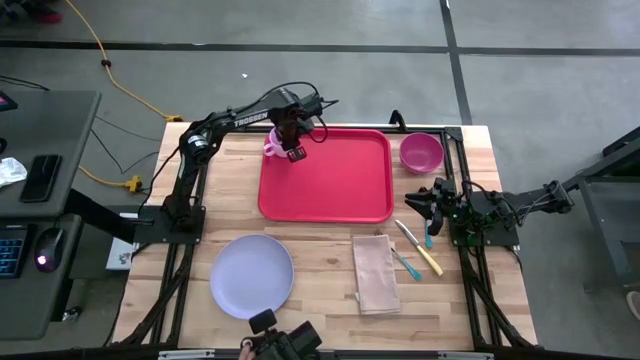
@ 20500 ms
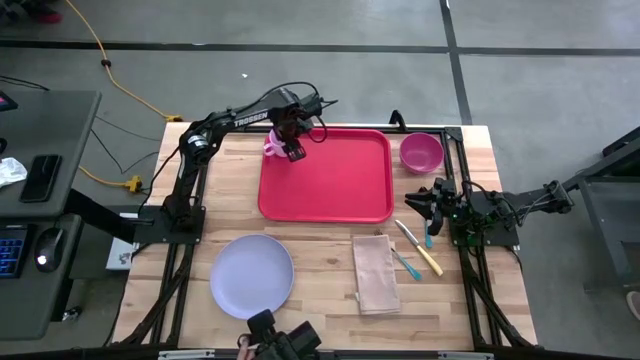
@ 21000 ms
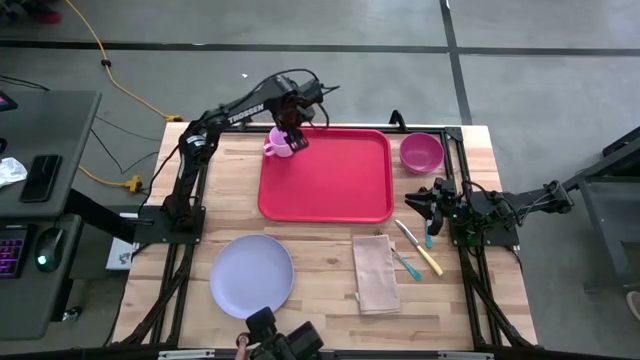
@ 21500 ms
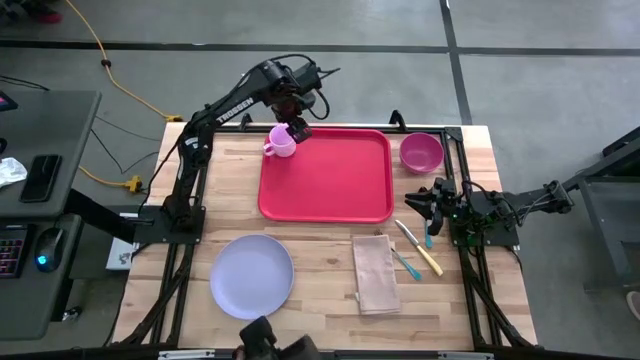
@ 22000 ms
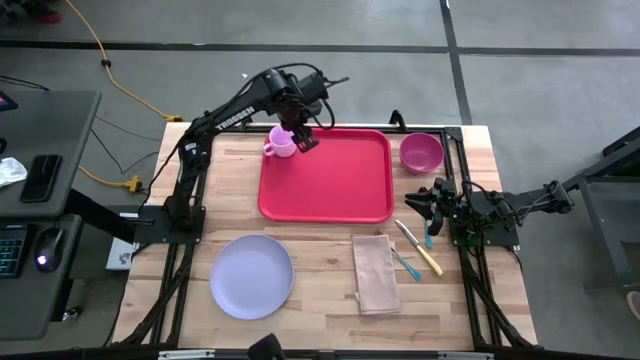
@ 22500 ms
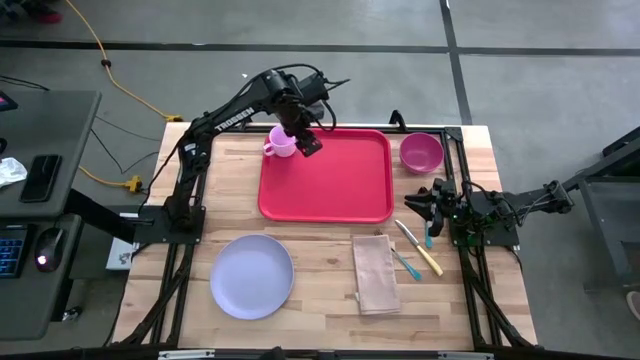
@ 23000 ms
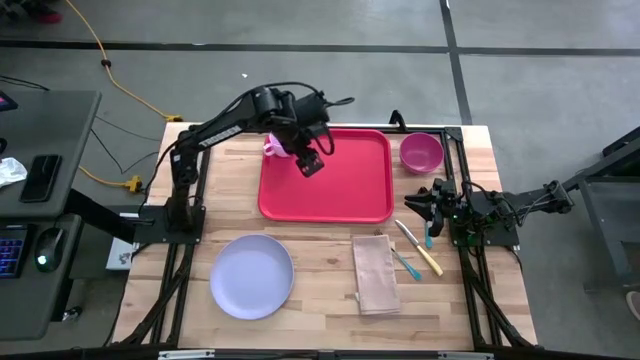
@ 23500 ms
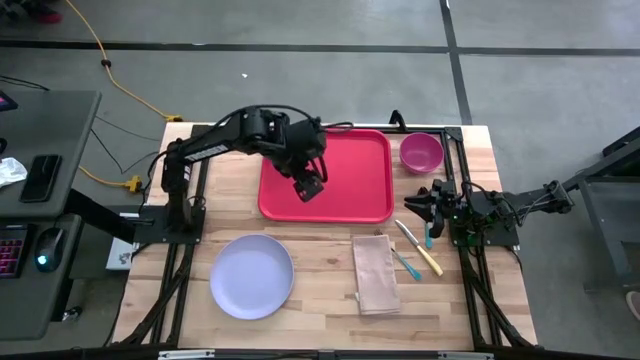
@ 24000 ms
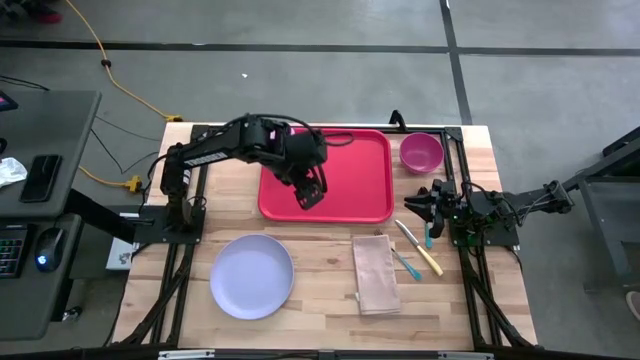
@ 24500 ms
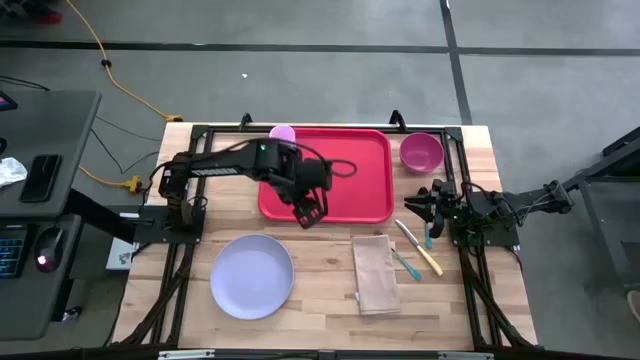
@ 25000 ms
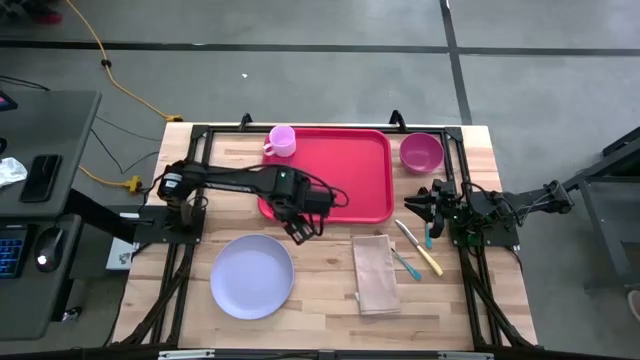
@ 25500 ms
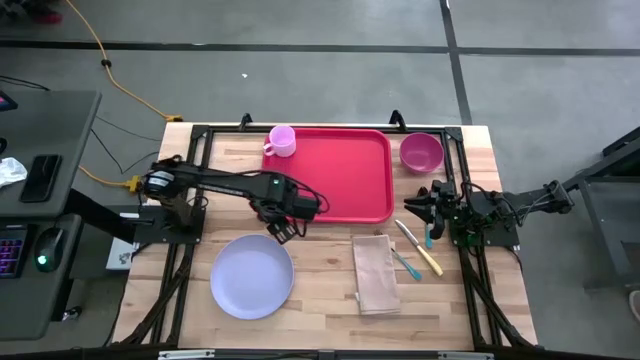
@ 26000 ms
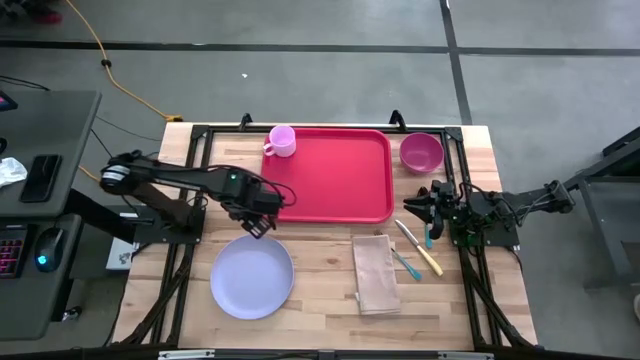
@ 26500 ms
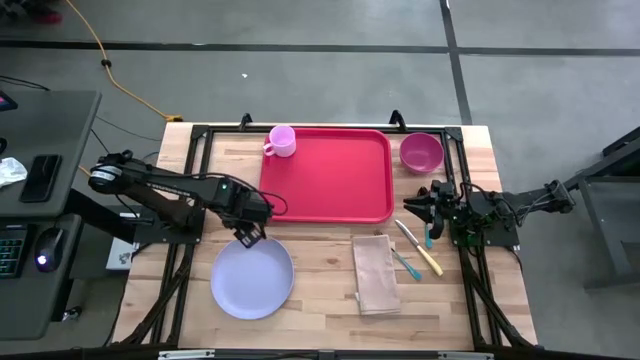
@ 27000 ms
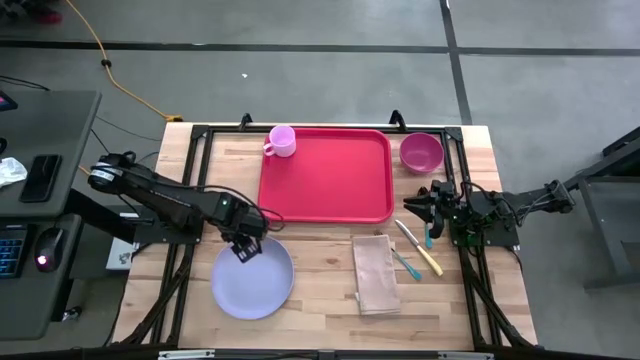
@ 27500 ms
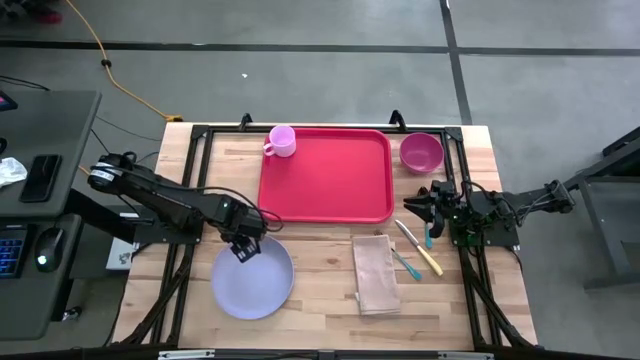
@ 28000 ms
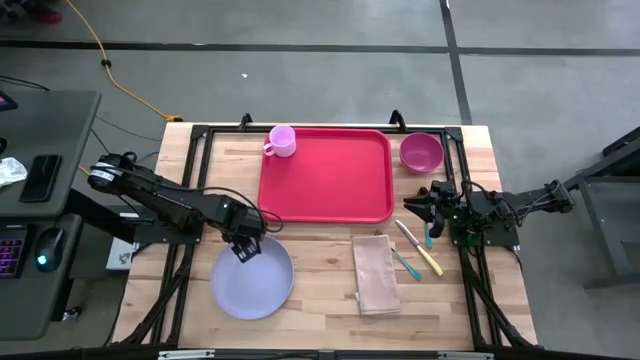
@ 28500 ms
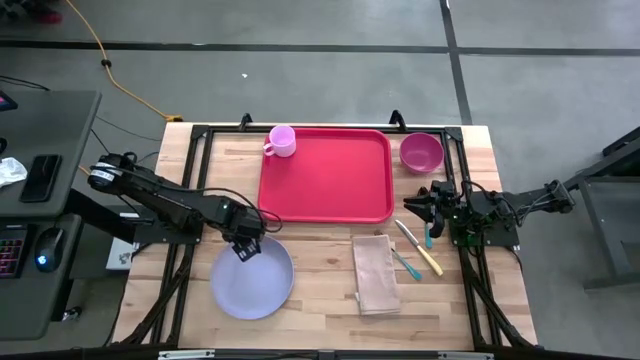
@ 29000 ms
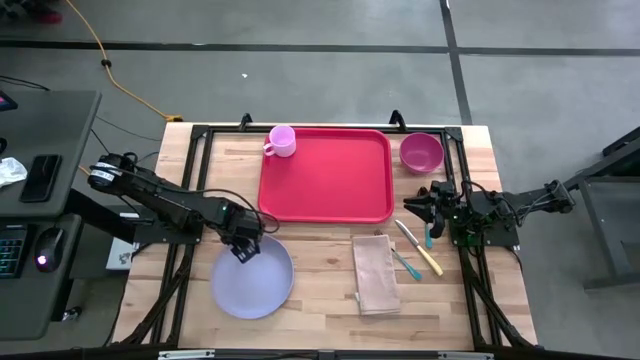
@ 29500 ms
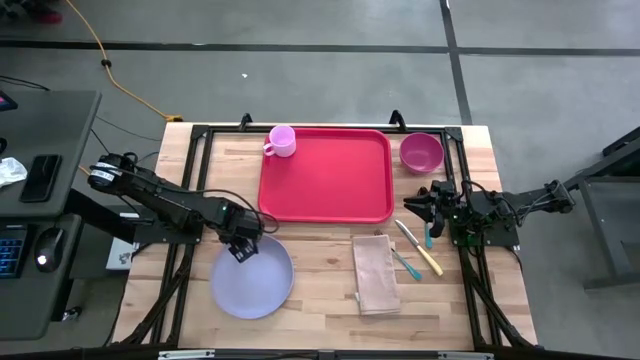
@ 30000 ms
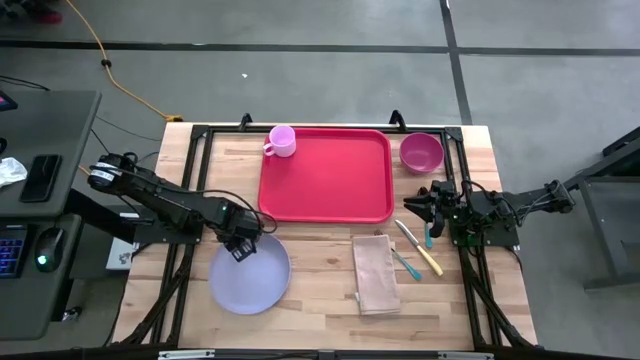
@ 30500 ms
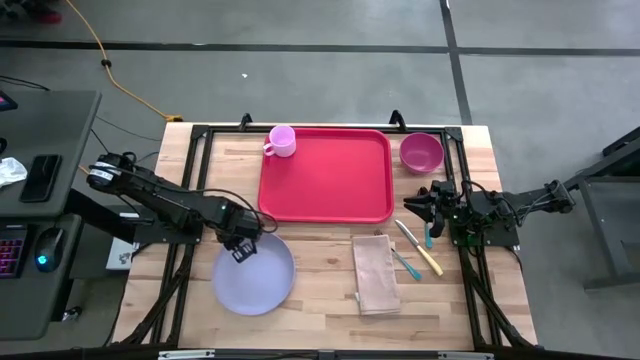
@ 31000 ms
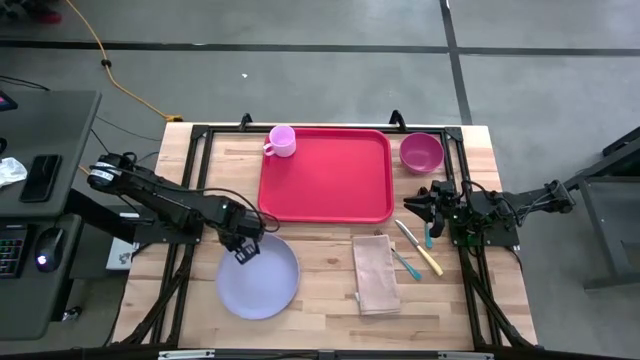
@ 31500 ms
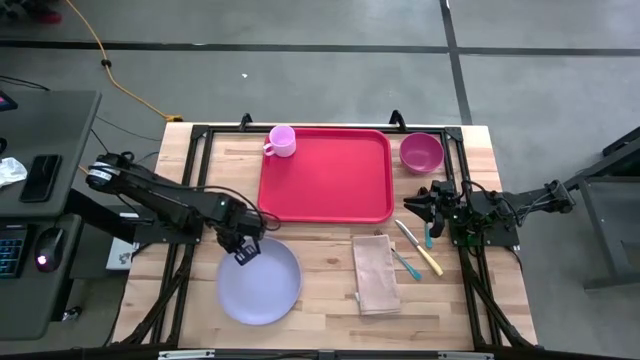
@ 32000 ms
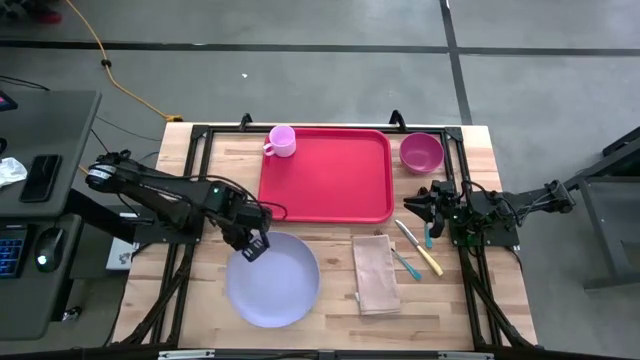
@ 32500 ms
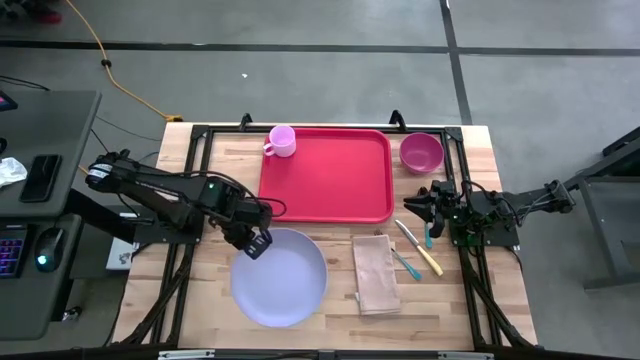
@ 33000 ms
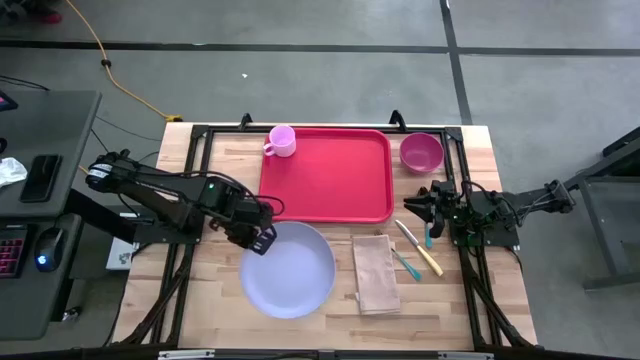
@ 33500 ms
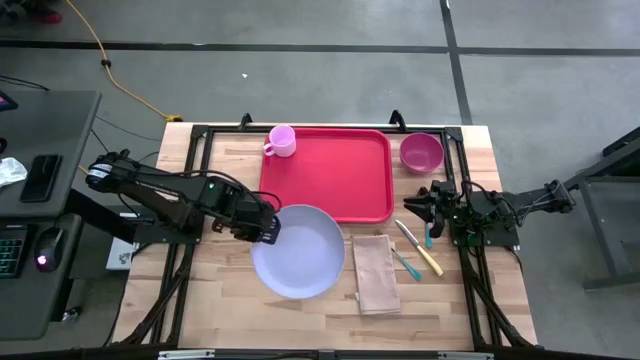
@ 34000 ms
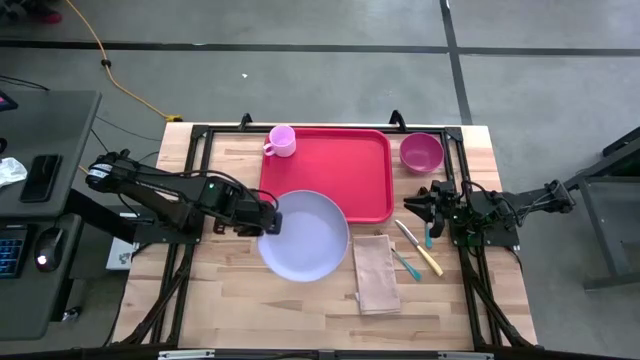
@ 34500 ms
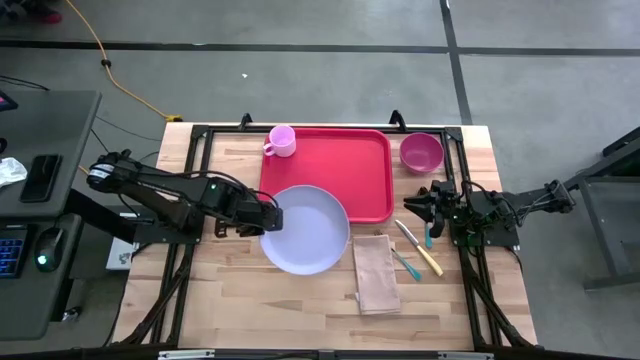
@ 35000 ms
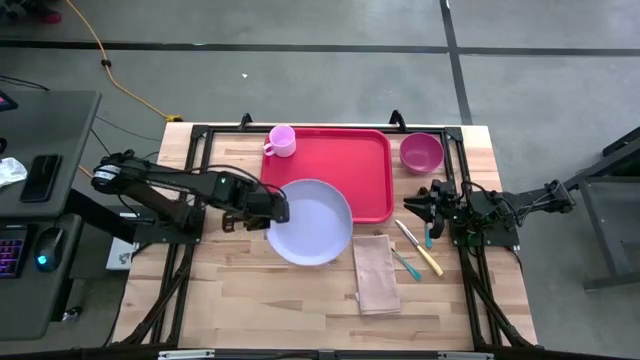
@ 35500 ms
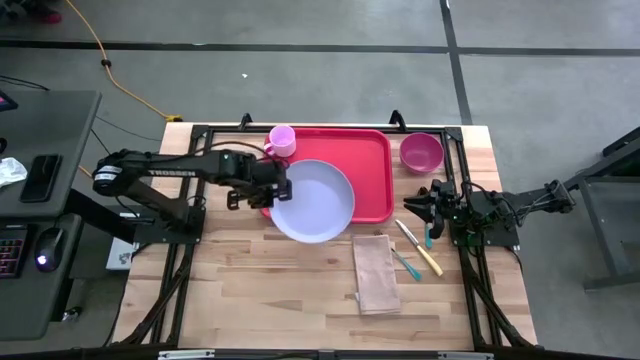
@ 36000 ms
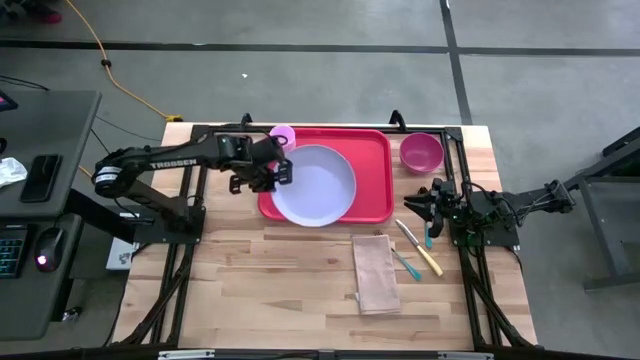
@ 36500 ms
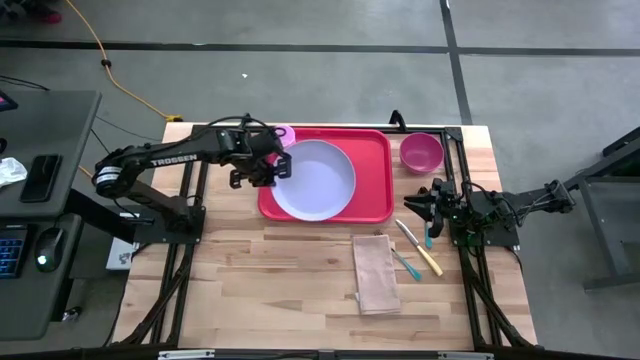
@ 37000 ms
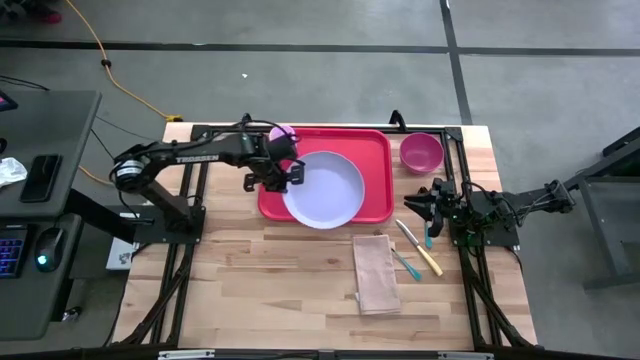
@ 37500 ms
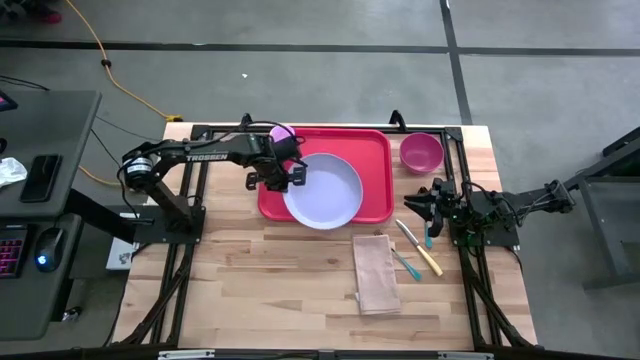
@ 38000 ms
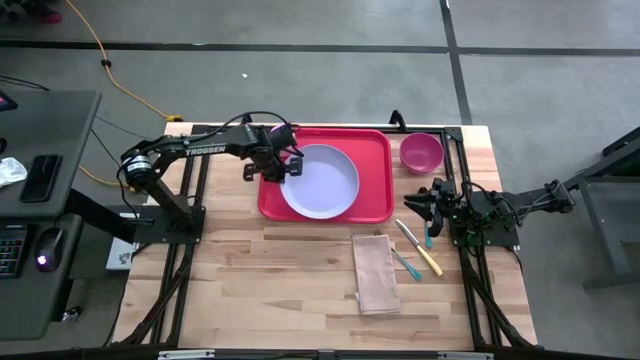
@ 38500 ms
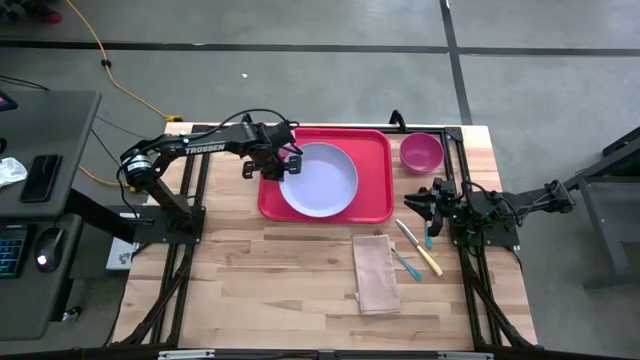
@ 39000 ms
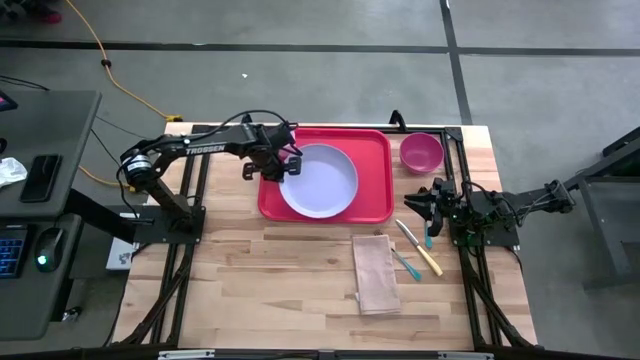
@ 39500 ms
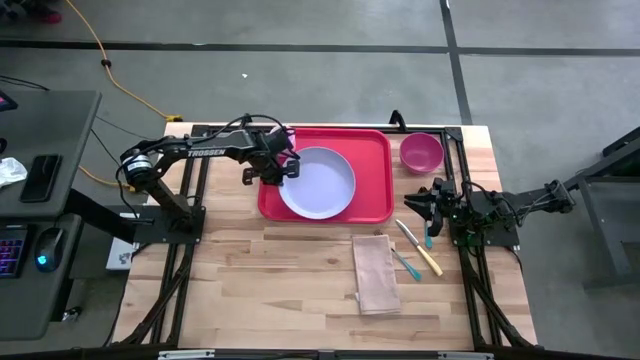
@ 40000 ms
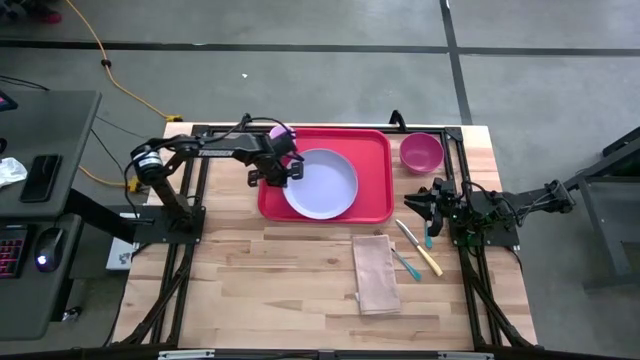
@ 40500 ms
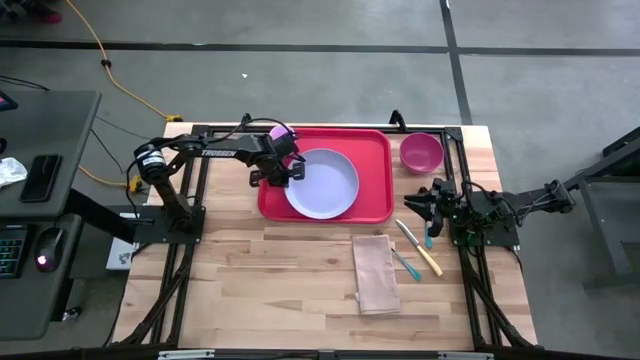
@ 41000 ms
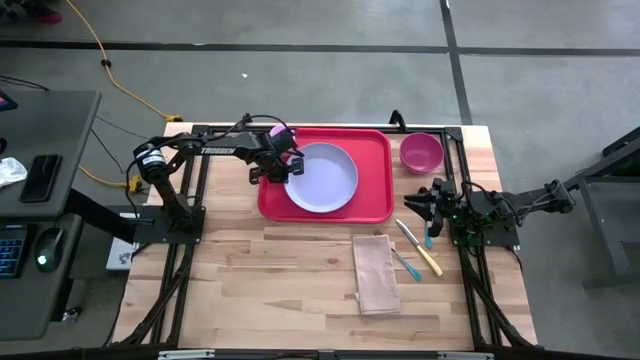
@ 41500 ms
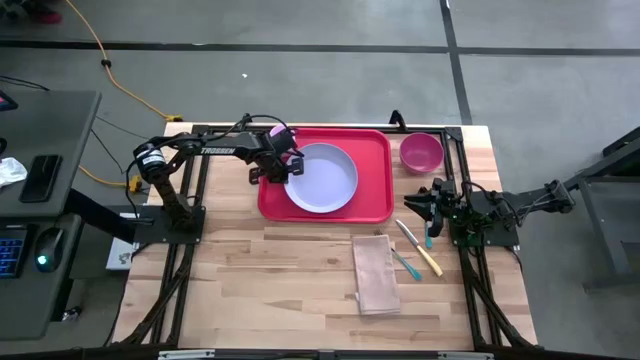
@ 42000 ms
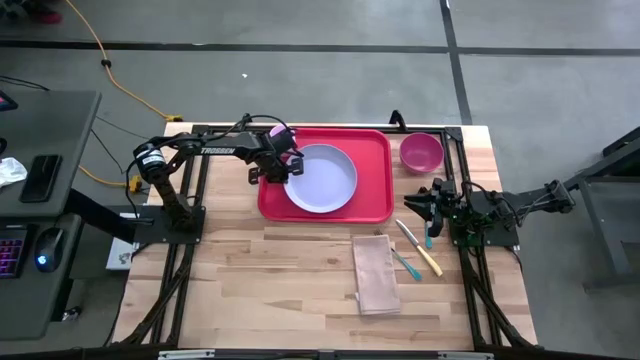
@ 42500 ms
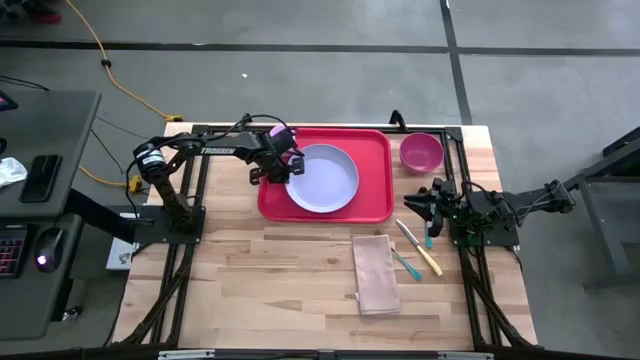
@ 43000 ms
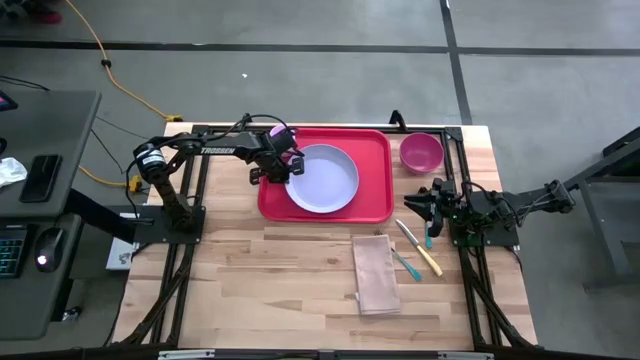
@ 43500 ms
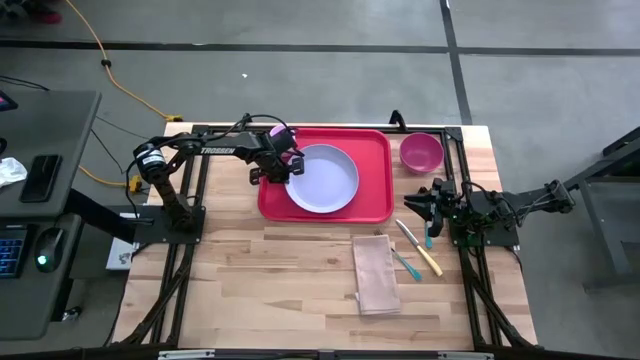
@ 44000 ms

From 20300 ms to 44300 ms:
Task: Set up tray
Put the light blue plate on the tray
